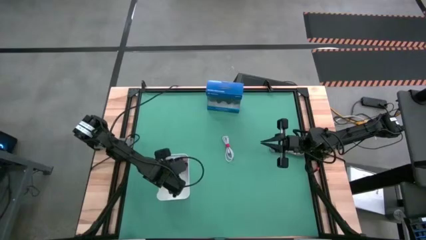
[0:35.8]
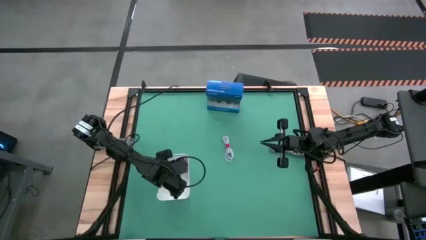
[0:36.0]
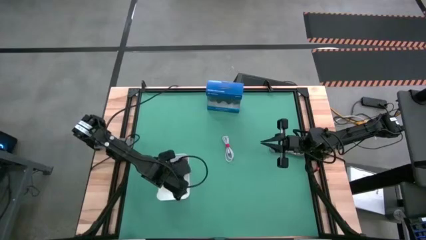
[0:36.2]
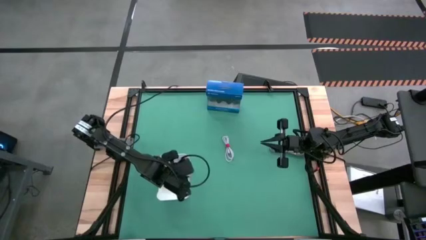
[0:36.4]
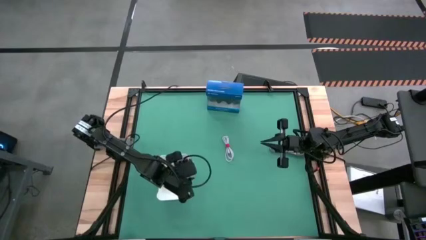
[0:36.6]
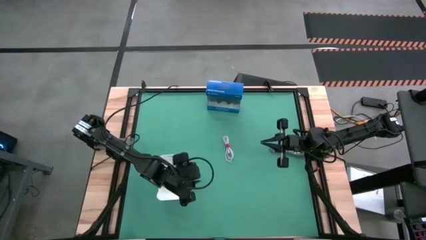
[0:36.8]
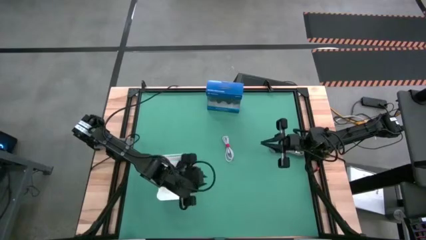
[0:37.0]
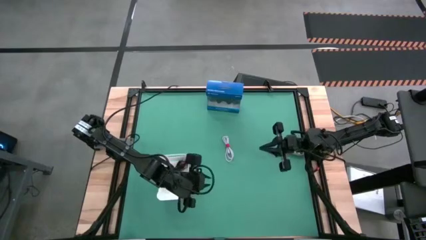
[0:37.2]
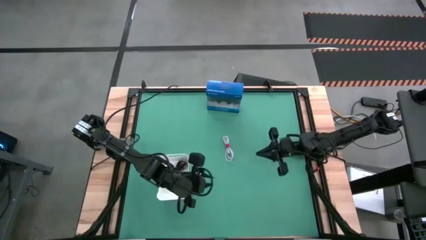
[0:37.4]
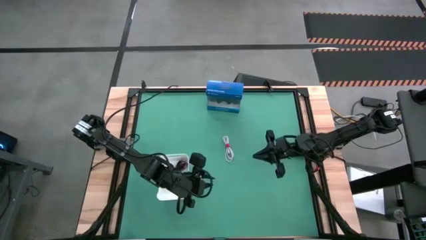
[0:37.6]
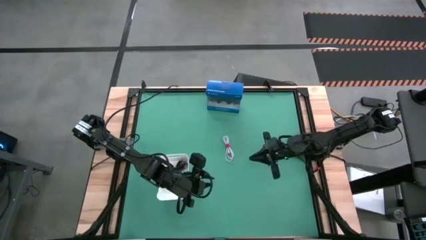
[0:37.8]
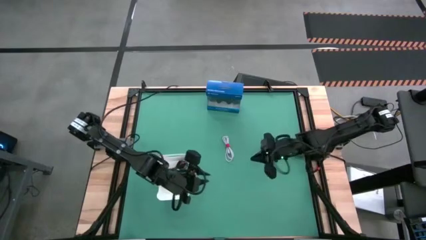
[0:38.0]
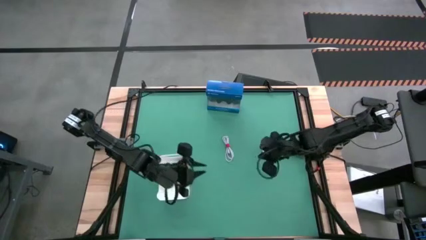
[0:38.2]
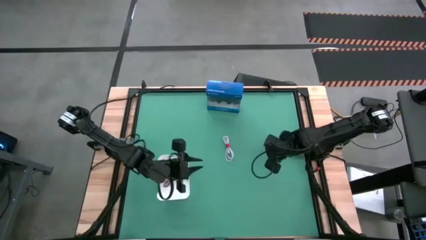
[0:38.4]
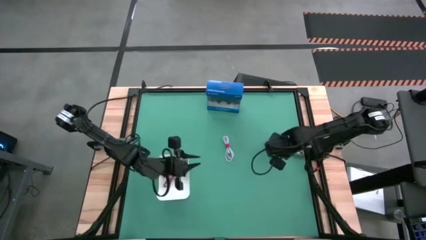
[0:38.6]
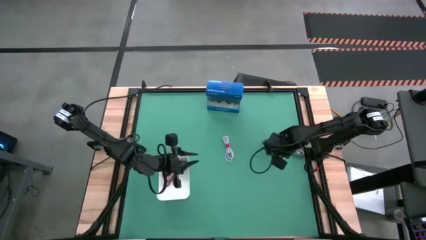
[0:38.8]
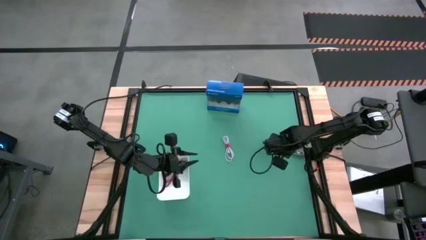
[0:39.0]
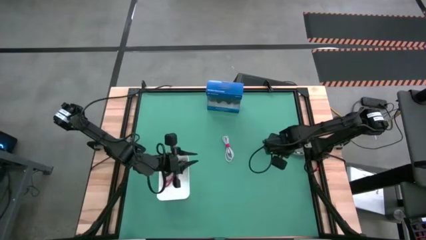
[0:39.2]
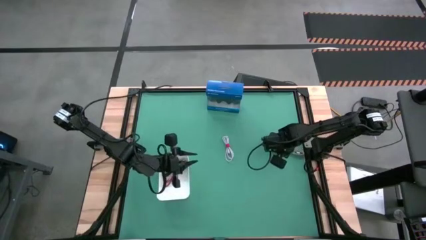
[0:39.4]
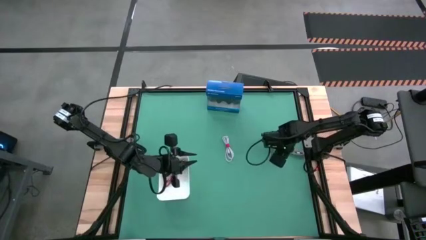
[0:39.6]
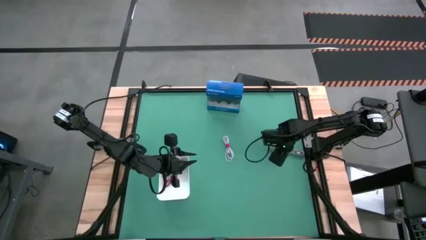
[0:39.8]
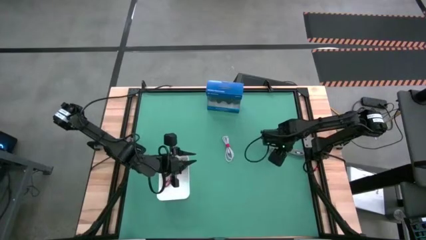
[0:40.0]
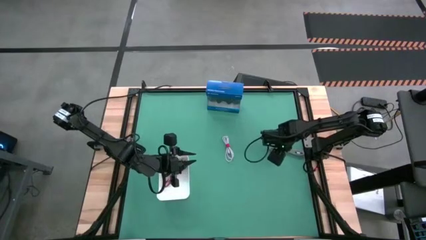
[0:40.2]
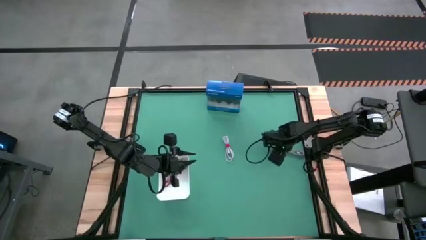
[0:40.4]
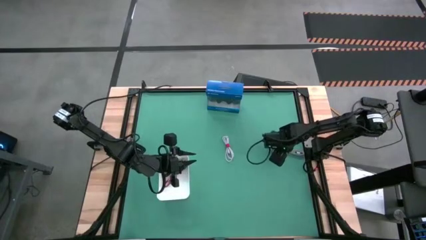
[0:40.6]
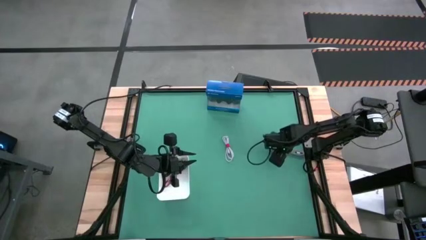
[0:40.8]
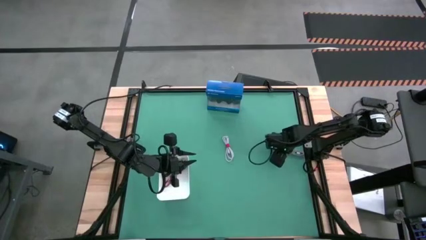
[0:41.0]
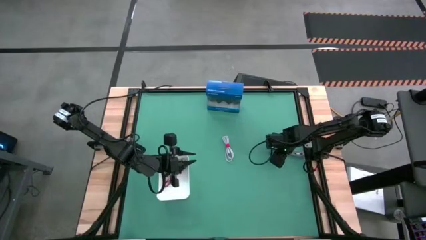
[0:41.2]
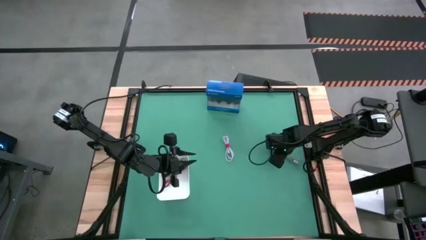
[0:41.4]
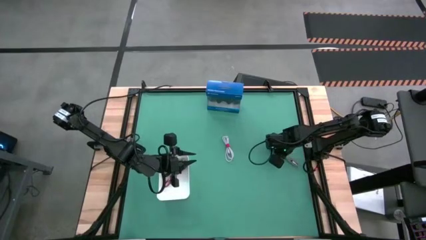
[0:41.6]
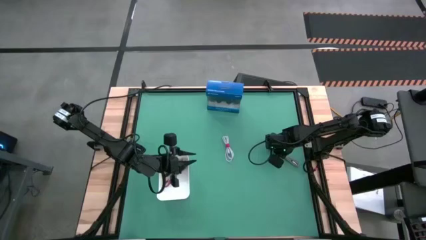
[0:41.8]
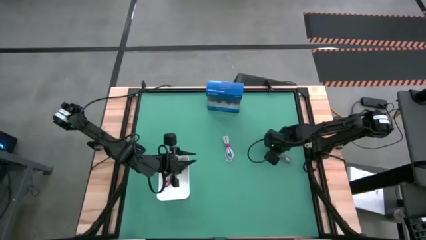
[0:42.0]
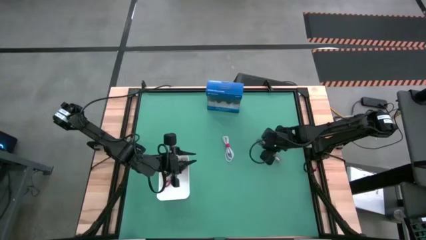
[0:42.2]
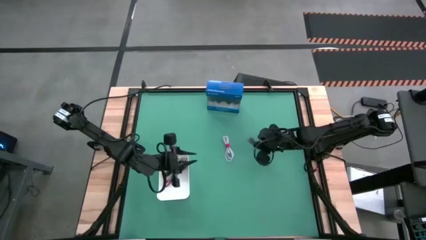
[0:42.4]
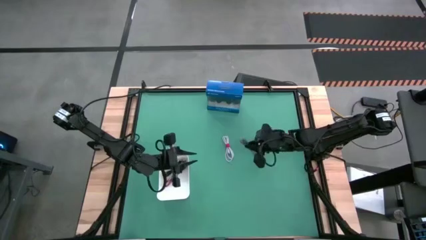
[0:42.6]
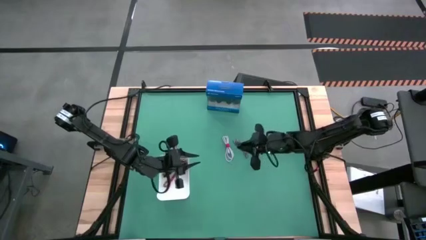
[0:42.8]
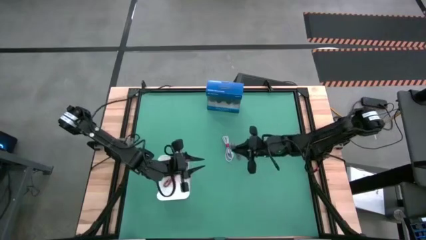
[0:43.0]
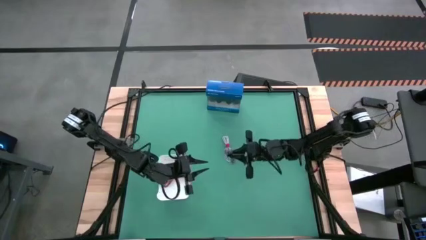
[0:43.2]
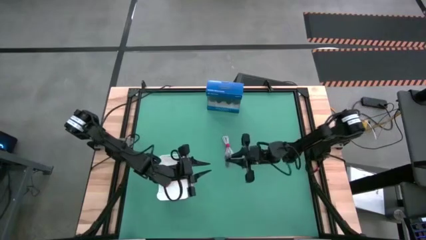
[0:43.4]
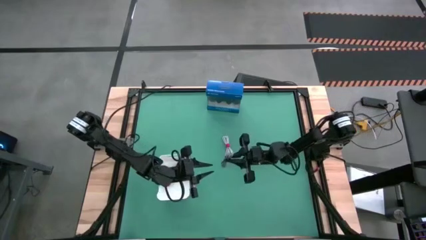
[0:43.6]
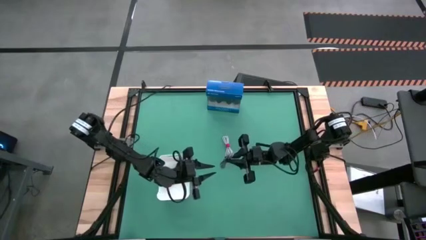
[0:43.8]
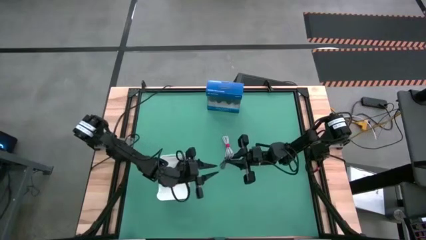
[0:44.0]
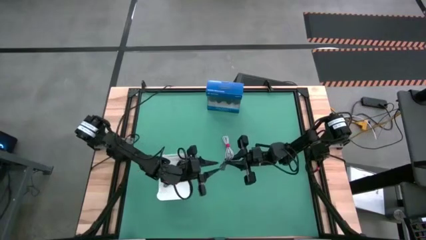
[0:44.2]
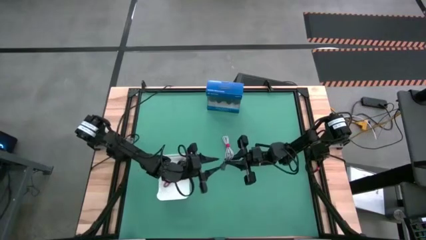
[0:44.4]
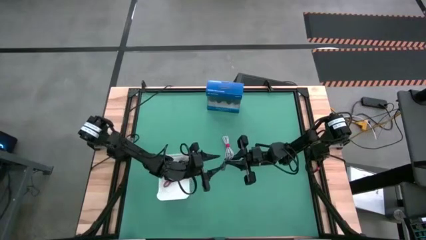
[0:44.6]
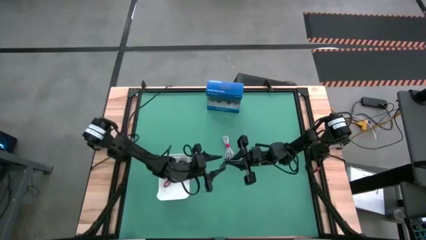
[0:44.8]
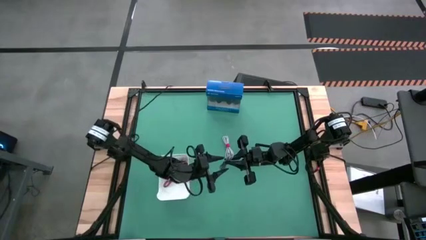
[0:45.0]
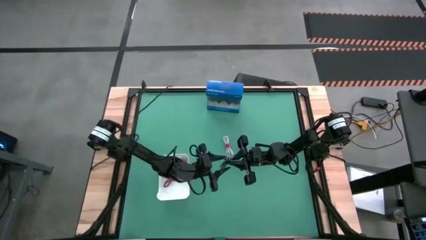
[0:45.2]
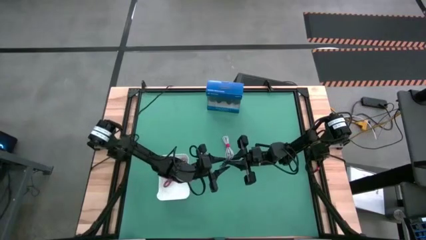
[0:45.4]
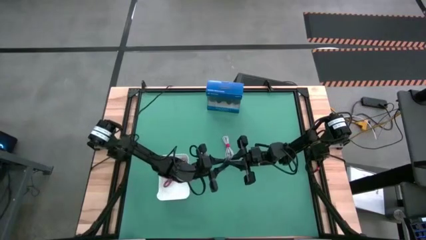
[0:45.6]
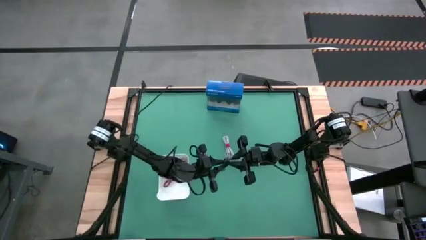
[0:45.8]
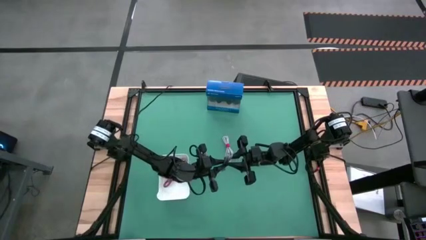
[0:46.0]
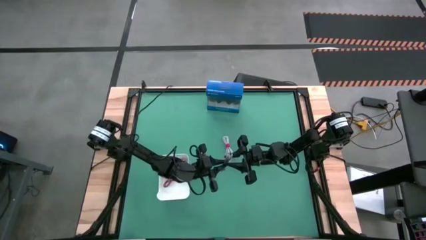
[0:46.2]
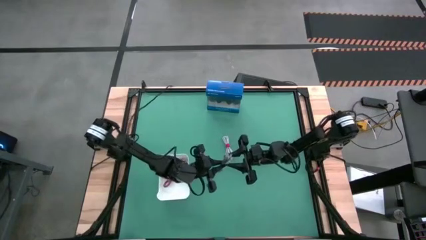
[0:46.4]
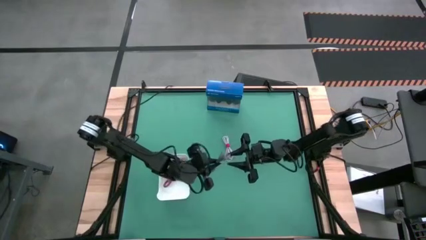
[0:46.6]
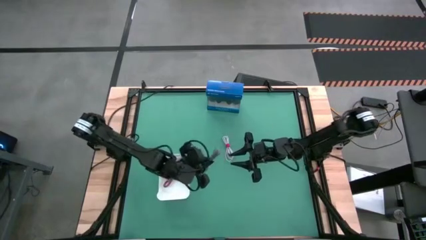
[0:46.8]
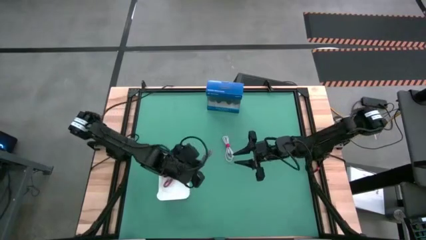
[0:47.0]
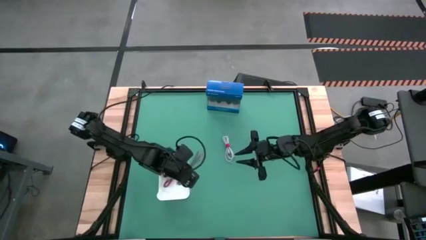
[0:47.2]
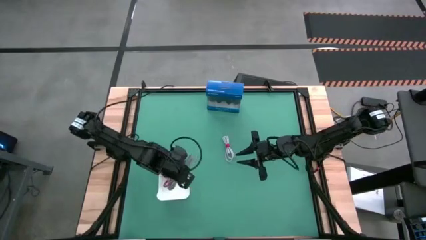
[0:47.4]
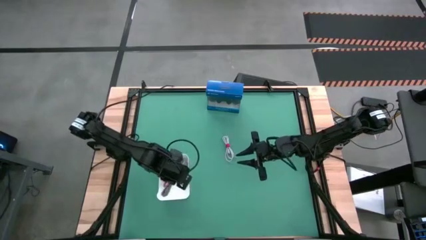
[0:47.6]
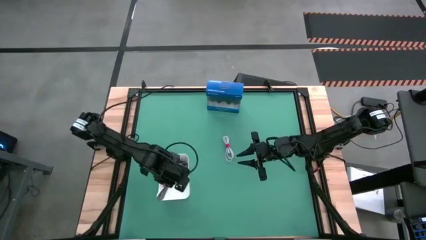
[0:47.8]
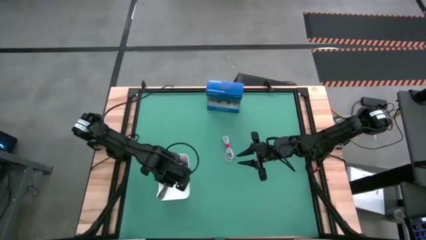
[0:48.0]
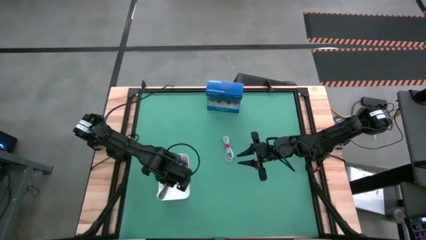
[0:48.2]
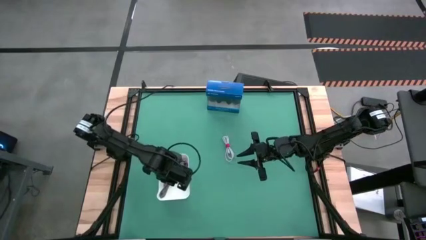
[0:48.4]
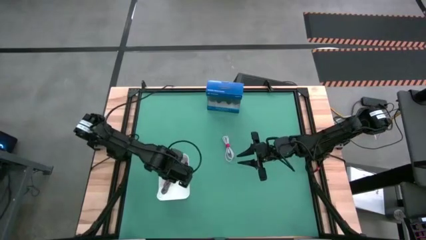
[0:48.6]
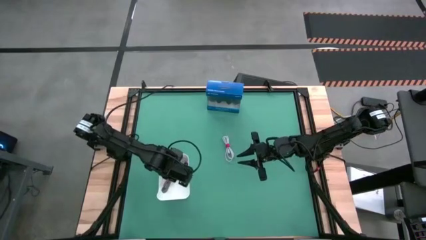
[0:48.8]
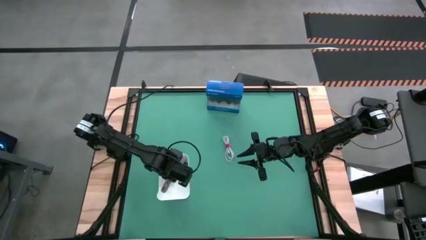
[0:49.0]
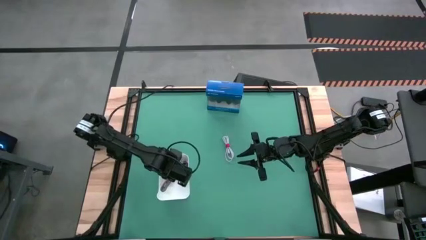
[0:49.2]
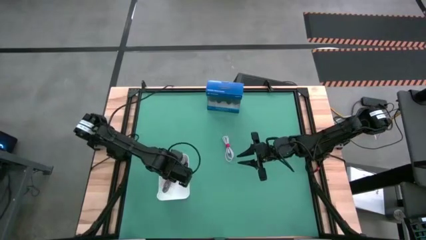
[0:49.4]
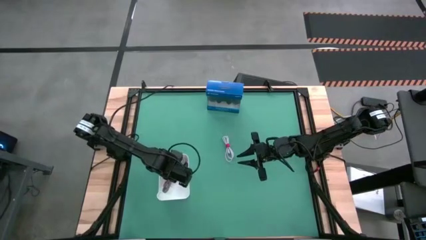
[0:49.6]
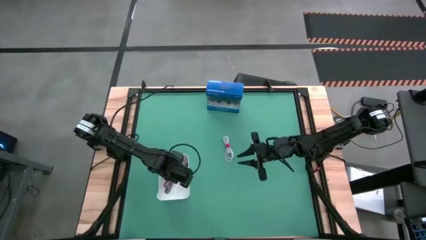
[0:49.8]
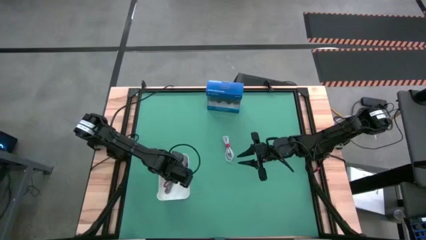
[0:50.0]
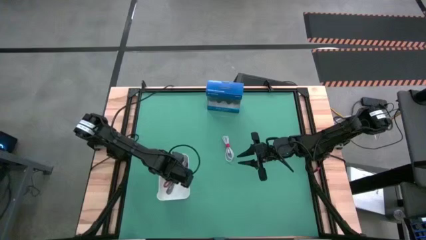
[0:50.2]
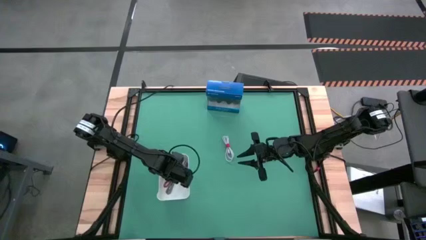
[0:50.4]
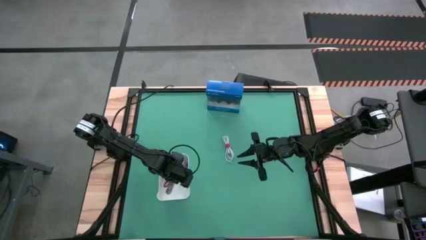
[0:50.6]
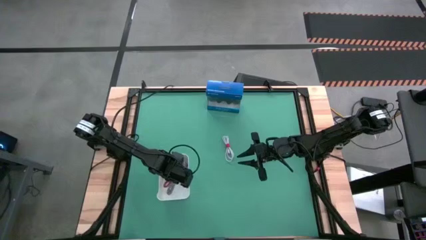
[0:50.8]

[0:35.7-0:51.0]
Task: Pick and place USB-C Cables
Put the white black charger cable into the white bin
